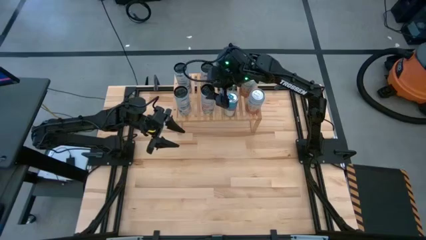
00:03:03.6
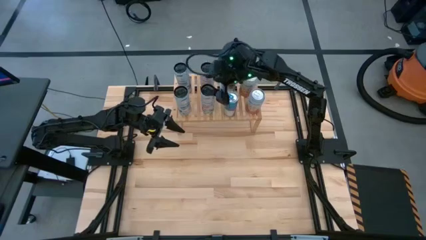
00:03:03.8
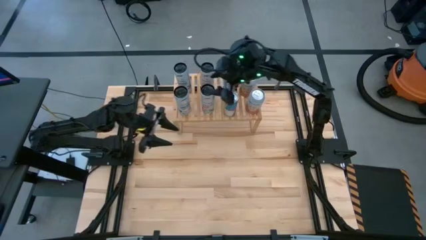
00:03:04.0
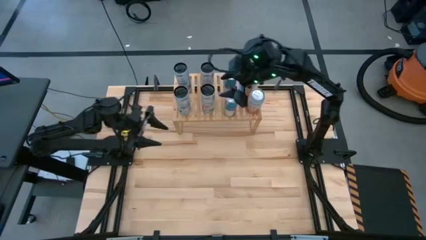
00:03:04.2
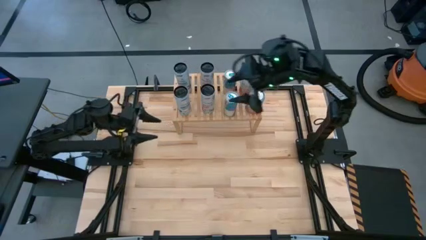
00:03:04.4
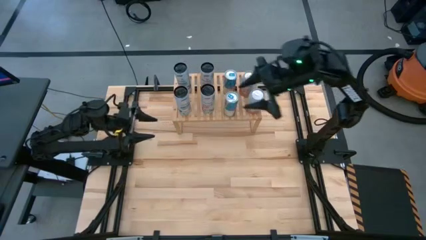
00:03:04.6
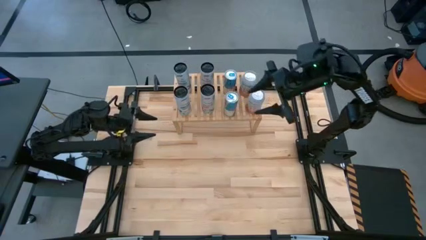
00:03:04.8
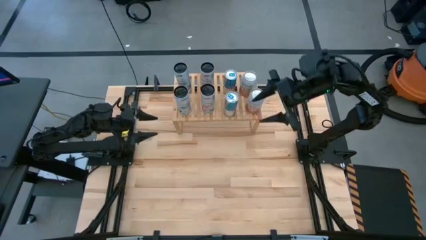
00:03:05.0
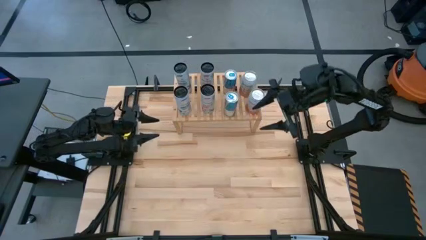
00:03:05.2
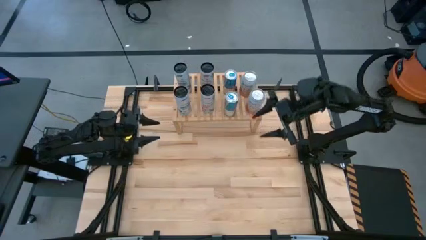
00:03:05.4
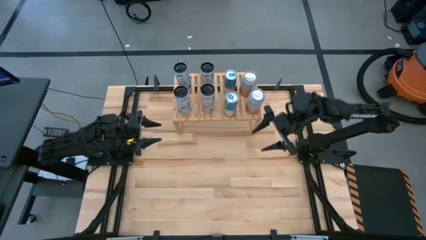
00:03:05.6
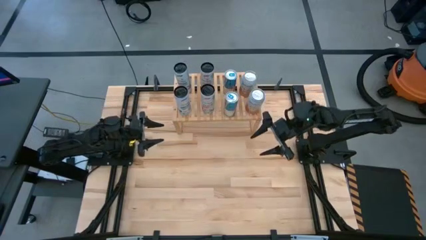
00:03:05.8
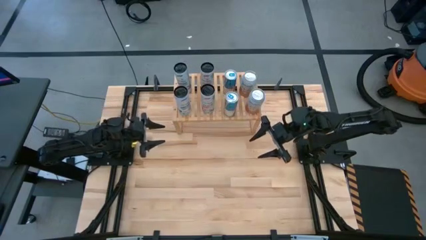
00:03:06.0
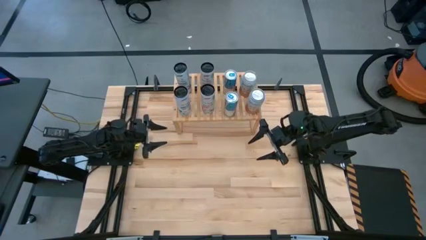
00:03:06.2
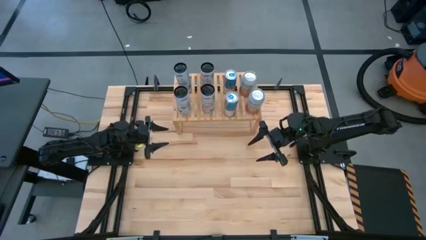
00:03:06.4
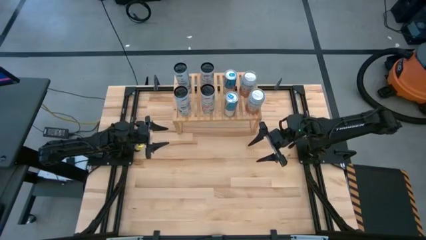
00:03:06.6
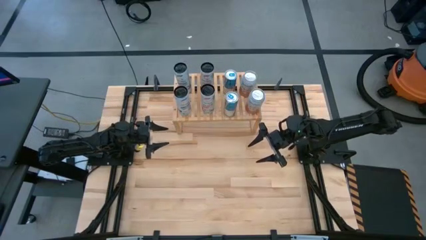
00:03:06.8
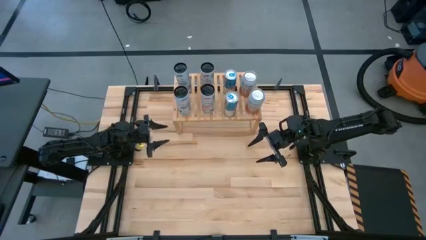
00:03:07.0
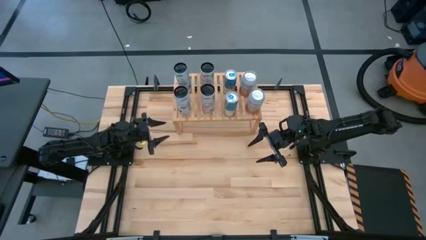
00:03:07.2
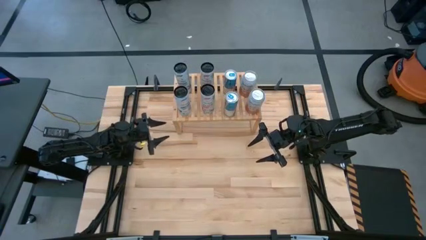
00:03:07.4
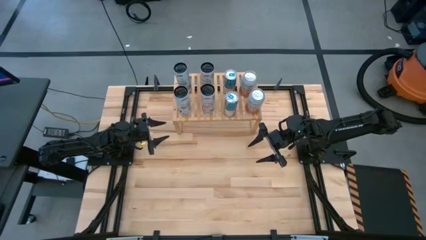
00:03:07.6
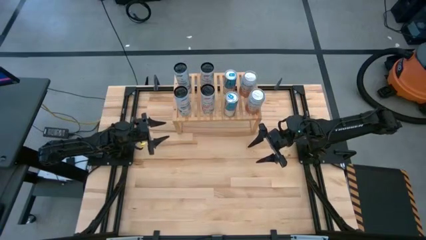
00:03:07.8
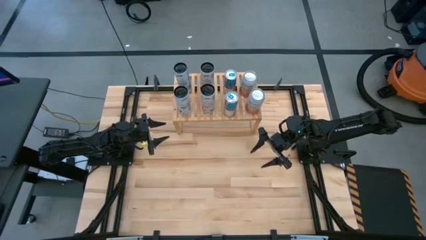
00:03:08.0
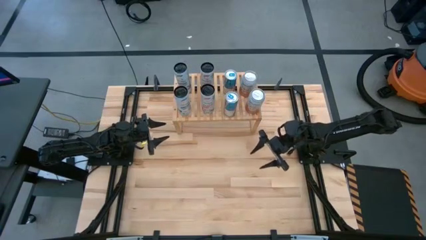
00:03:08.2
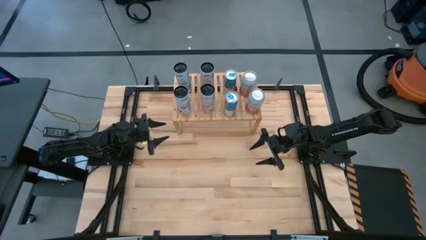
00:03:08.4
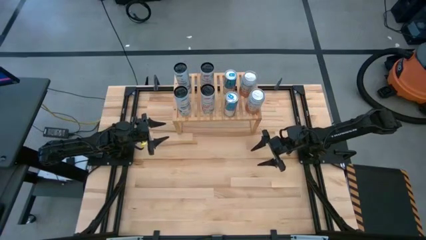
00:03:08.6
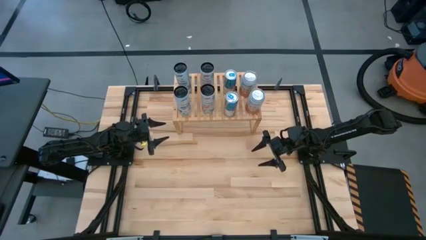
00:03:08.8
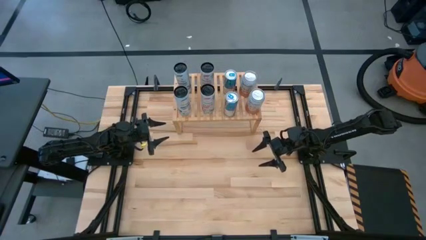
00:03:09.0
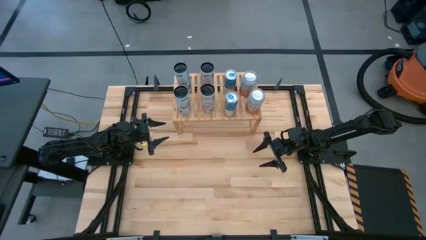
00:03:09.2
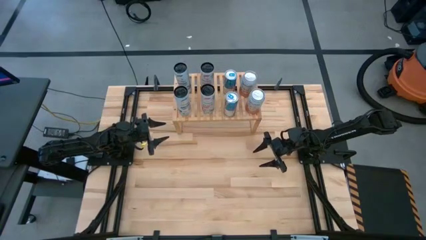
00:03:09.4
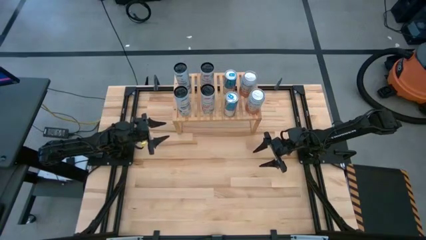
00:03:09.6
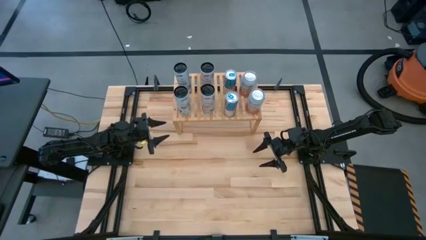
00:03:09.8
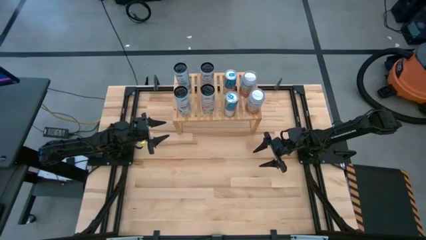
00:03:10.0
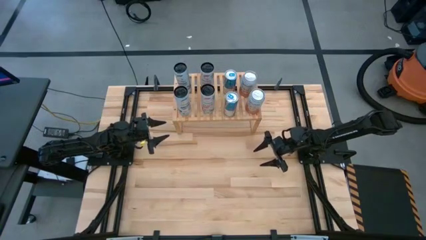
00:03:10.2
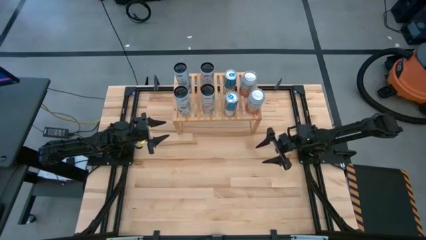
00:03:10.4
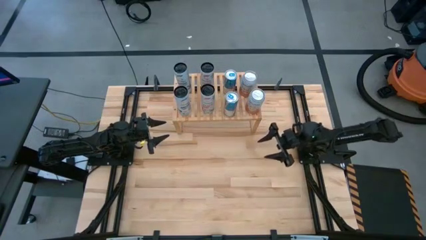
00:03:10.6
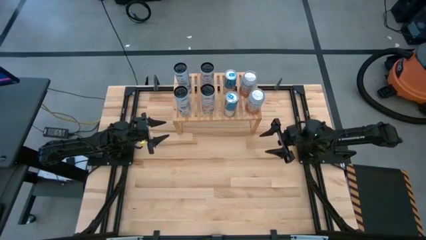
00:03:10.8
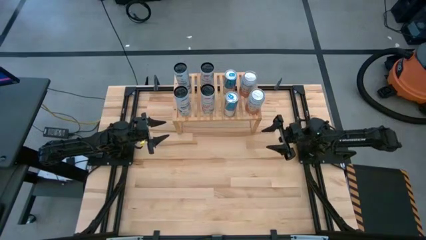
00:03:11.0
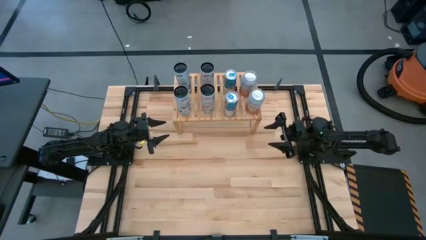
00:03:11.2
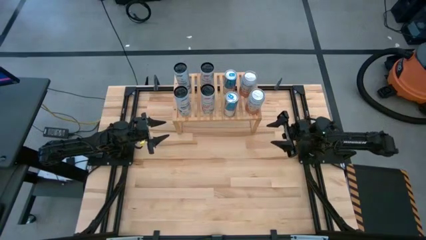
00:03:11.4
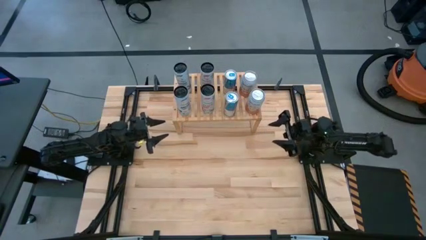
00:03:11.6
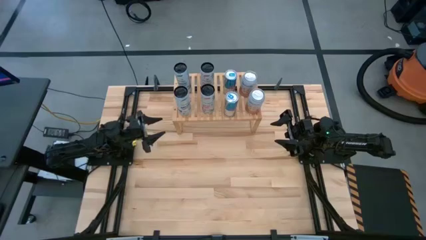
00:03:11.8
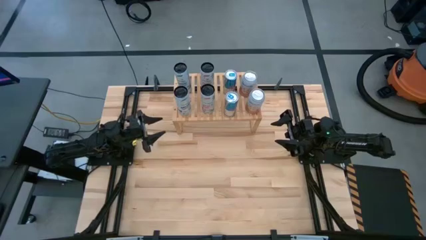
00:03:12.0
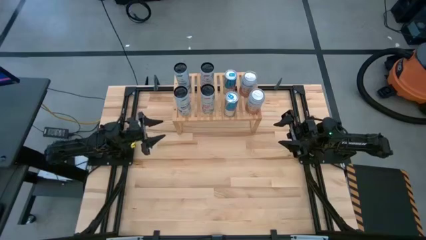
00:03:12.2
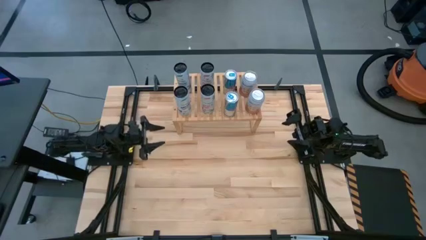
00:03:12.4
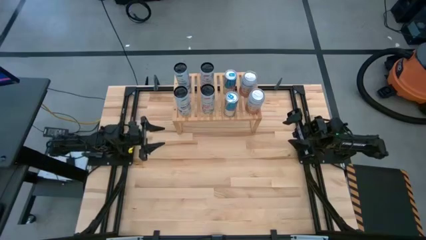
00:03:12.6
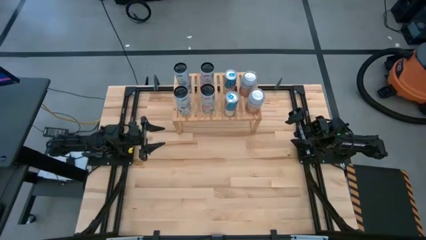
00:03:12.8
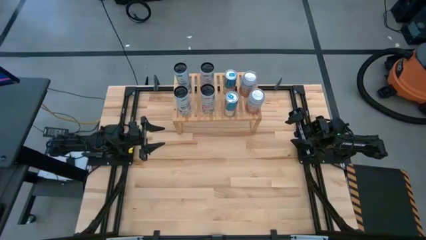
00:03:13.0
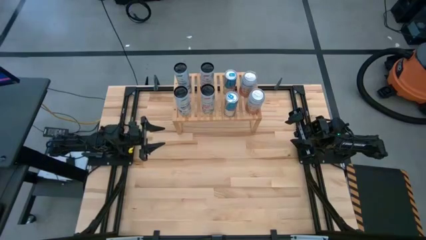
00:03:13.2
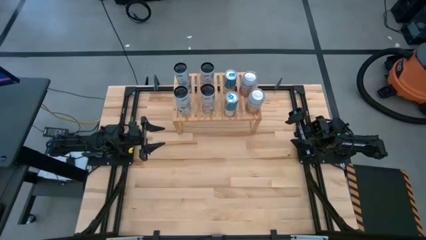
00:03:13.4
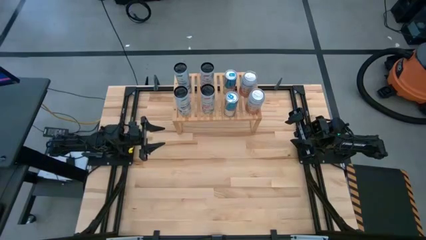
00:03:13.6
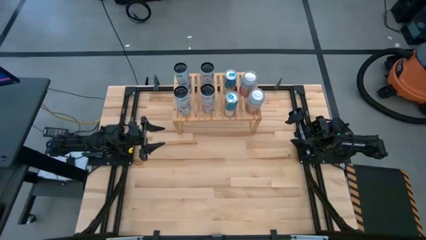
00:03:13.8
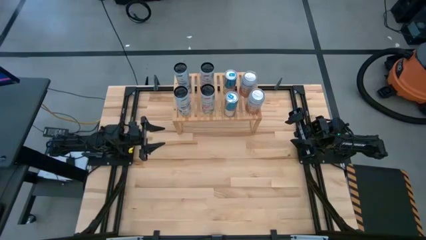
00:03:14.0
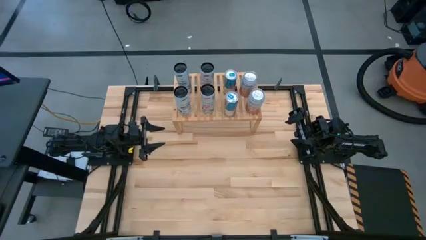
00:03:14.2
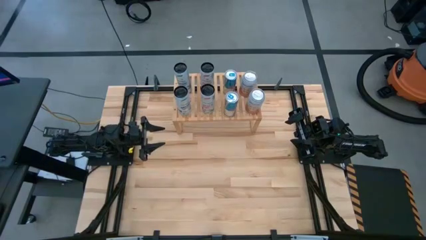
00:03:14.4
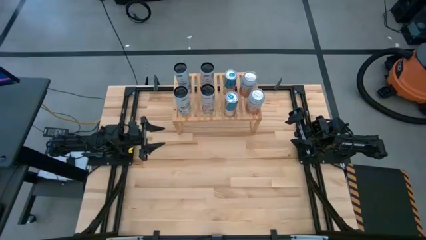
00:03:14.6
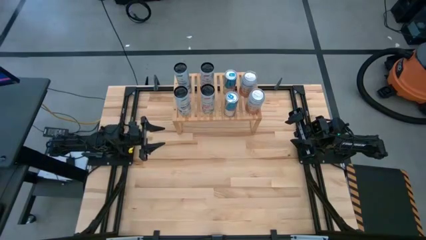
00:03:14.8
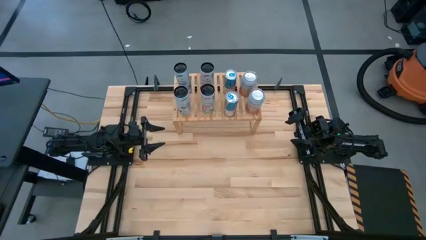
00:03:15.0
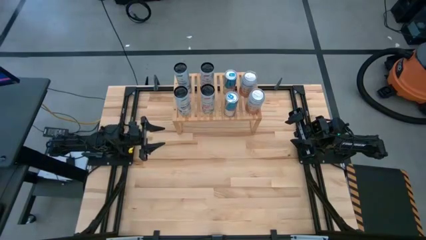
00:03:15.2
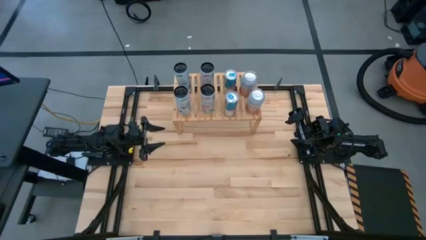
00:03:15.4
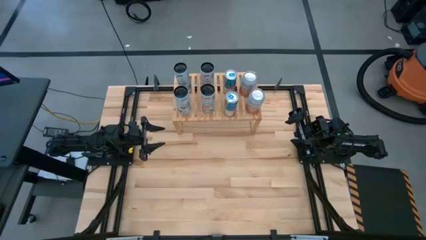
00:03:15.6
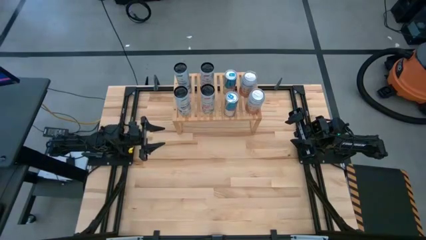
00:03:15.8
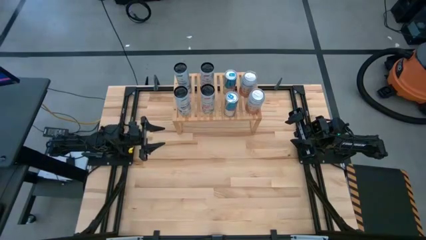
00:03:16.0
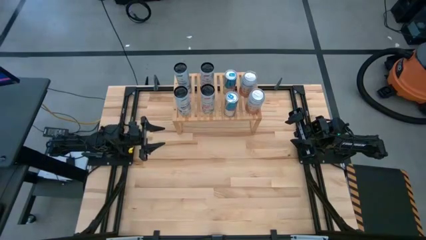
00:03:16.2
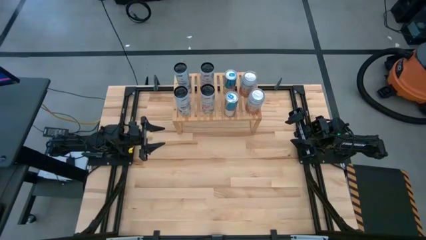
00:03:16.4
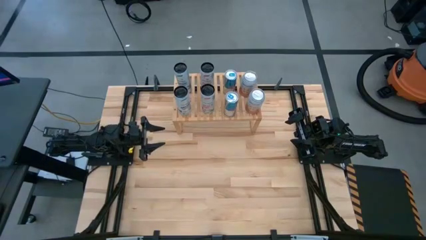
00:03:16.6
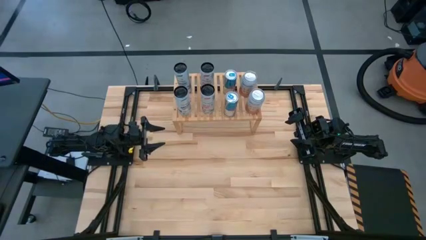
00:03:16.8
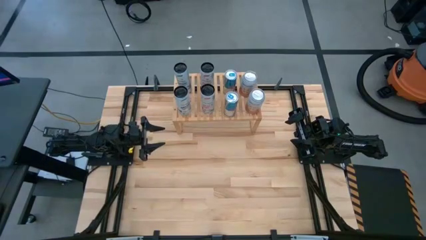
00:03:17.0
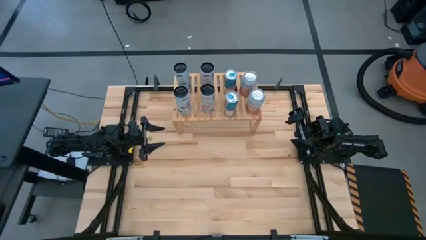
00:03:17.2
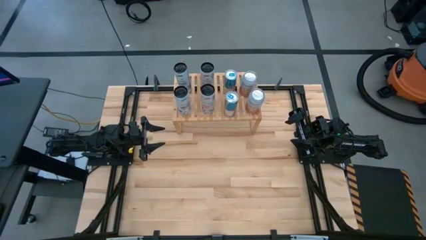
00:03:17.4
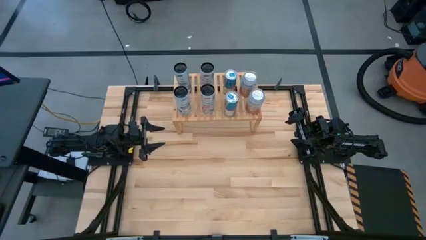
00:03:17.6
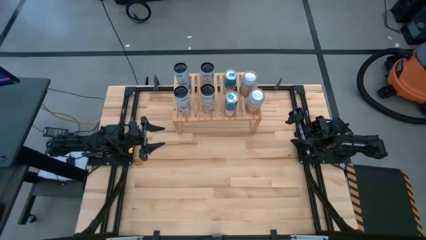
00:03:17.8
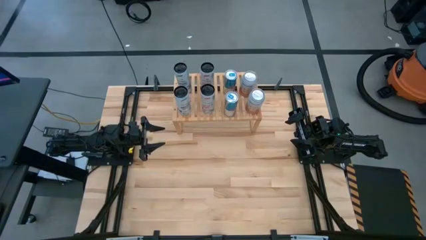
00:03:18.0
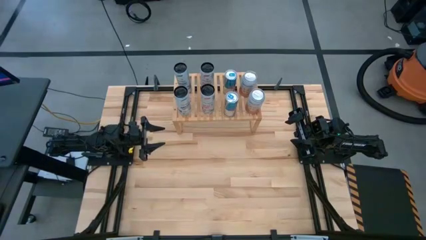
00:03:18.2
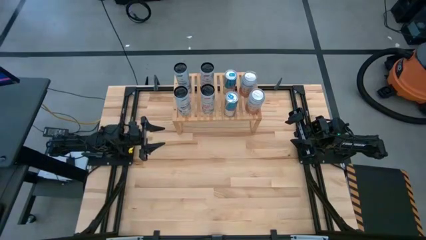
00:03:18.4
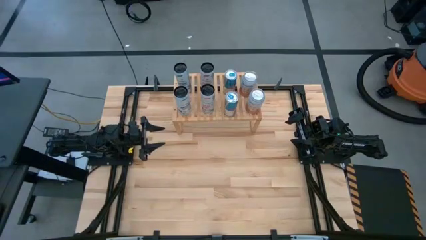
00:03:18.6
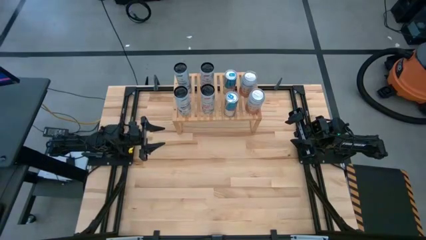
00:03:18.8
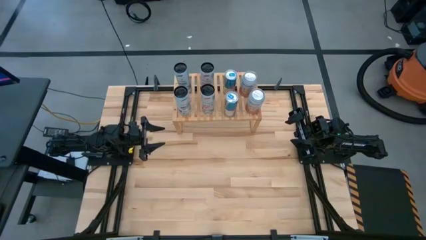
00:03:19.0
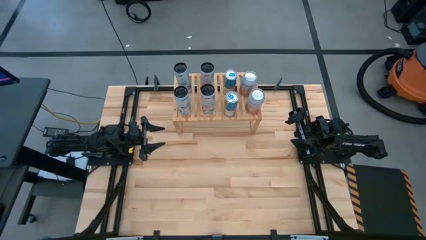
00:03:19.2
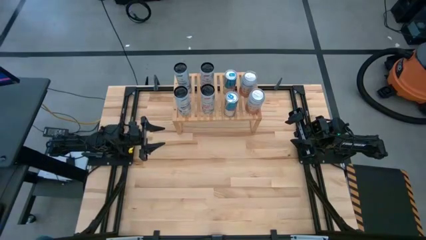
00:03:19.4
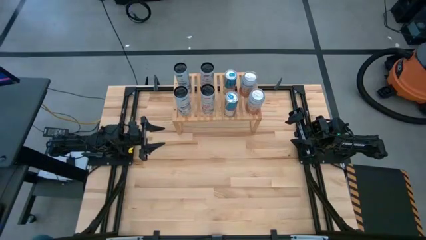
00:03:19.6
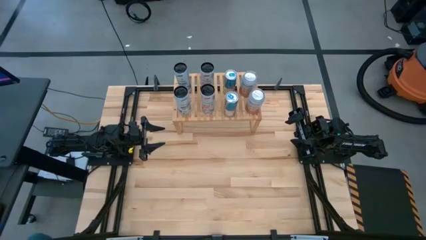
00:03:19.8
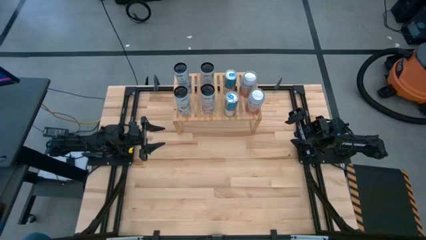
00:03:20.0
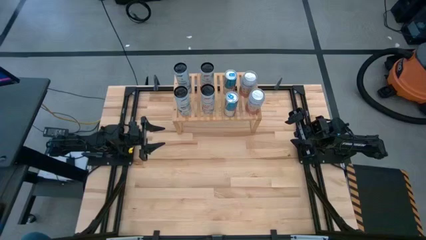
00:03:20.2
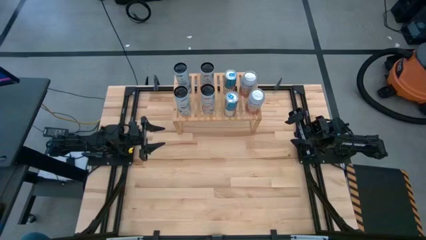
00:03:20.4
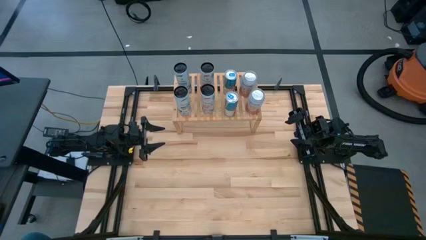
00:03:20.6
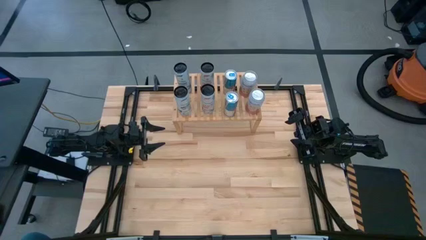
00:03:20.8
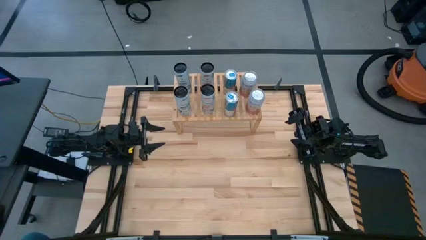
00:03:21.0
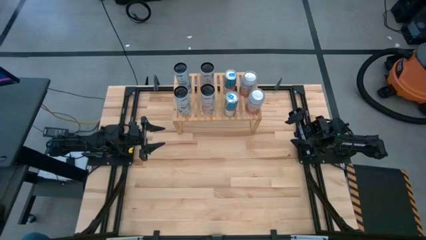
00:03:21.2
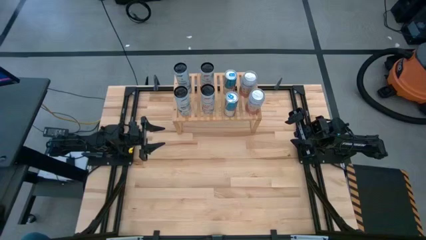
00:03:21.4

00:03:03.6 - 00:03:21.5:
Task: Place canned beverage on shelf
Return to Home Position
